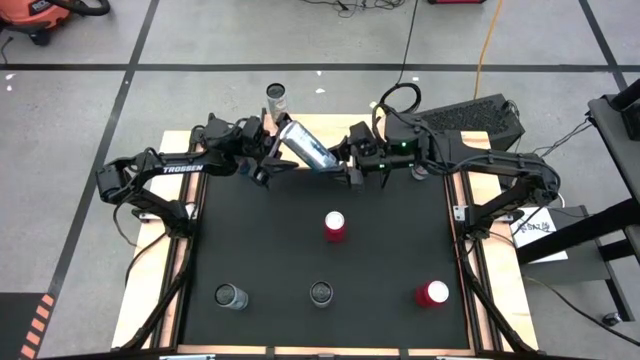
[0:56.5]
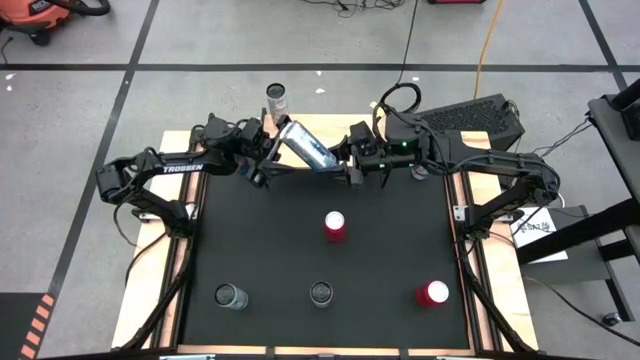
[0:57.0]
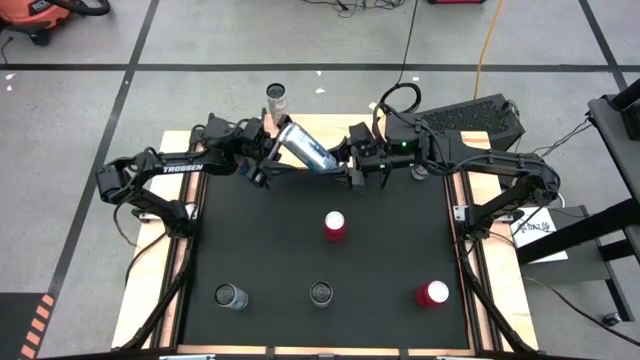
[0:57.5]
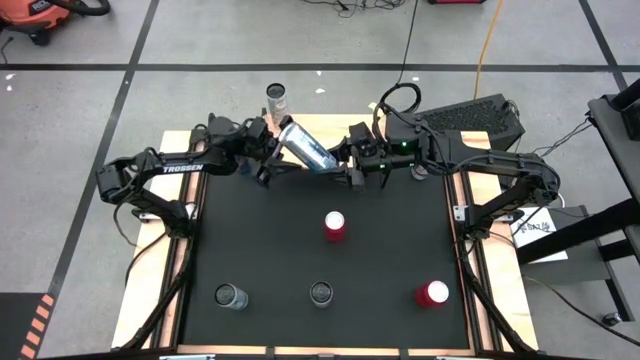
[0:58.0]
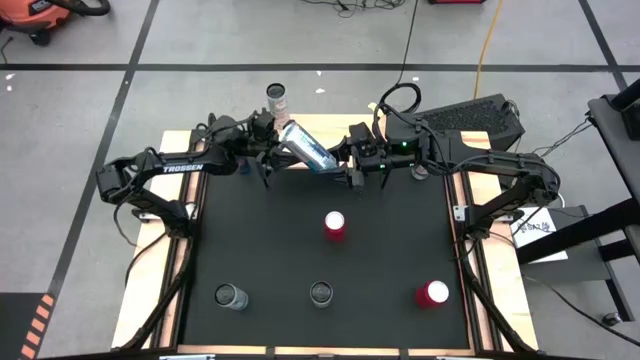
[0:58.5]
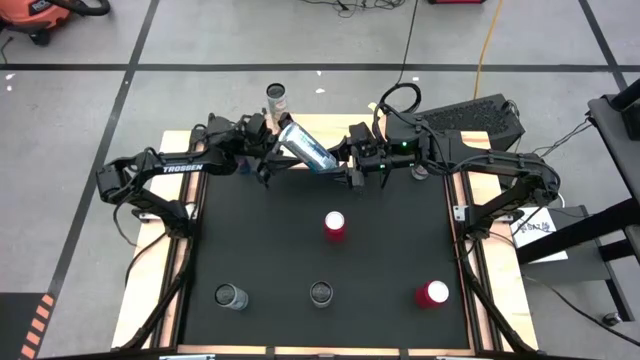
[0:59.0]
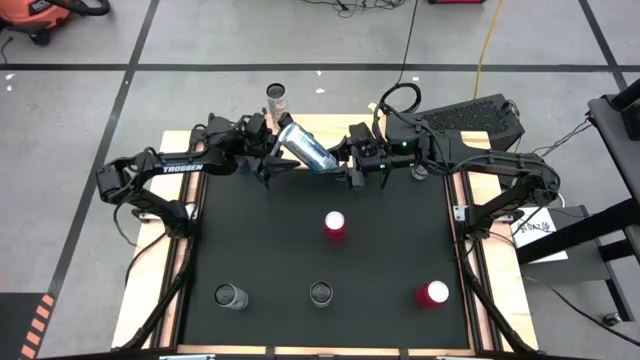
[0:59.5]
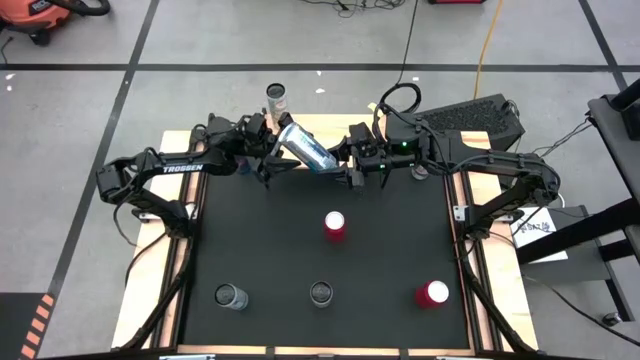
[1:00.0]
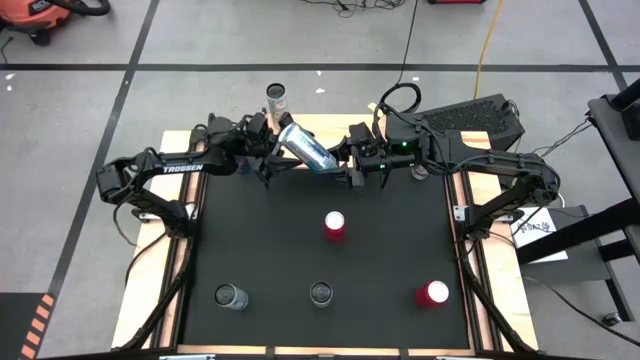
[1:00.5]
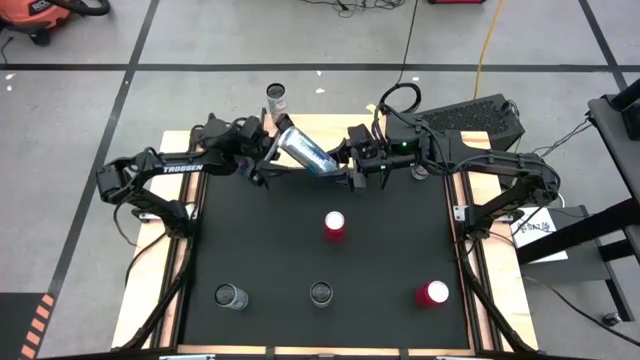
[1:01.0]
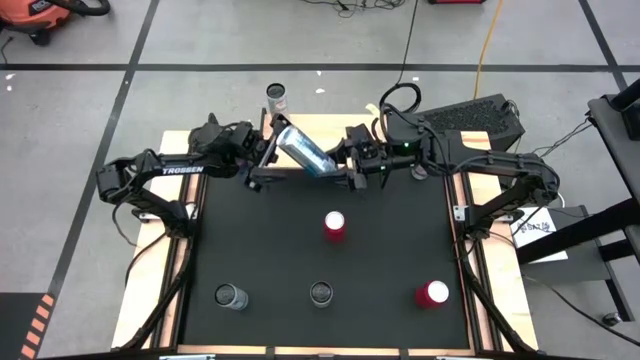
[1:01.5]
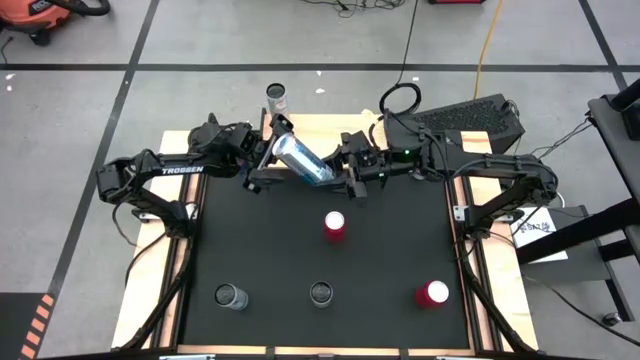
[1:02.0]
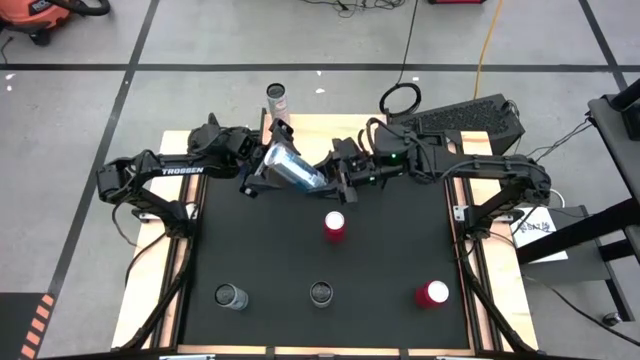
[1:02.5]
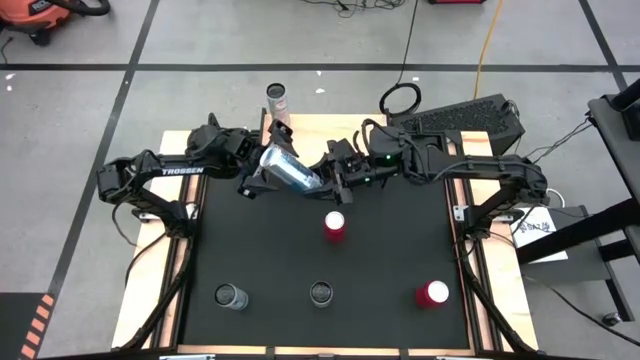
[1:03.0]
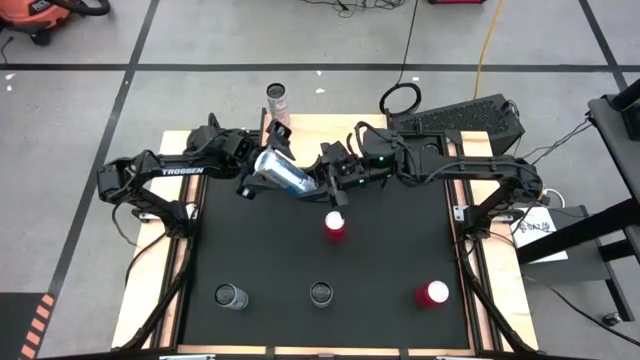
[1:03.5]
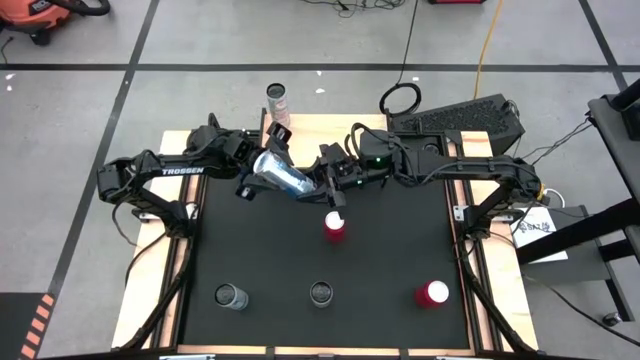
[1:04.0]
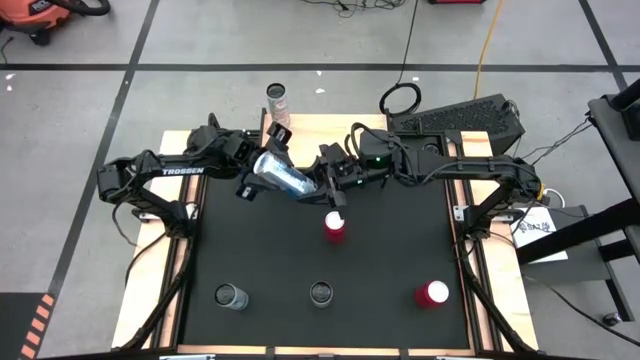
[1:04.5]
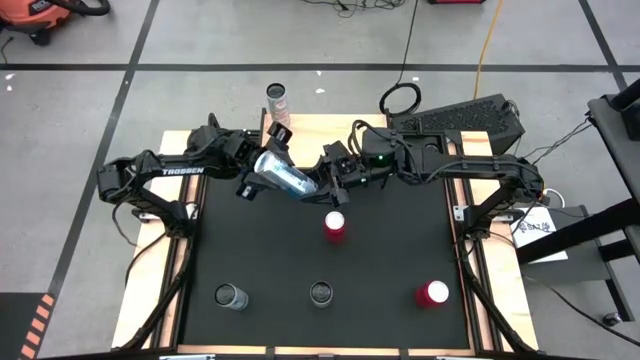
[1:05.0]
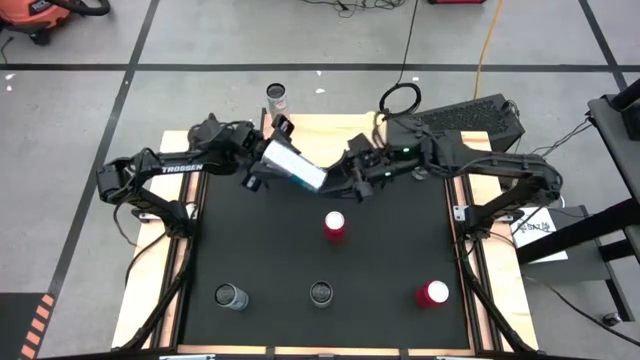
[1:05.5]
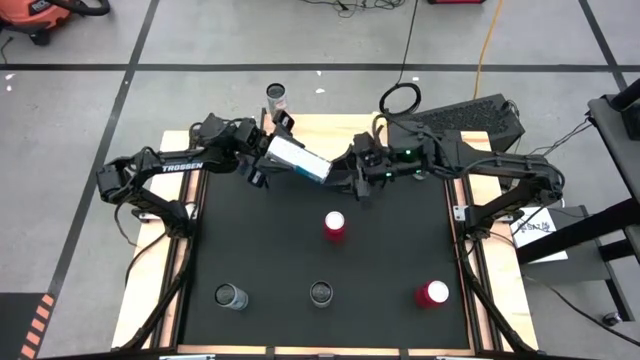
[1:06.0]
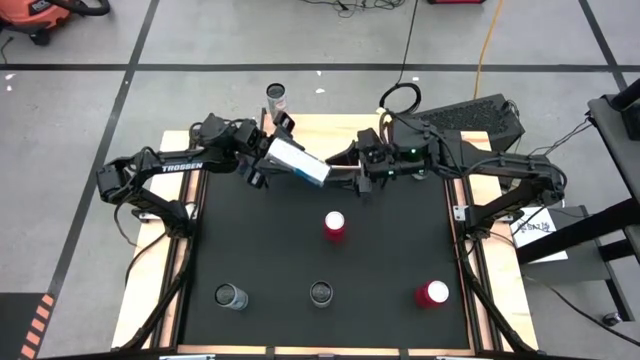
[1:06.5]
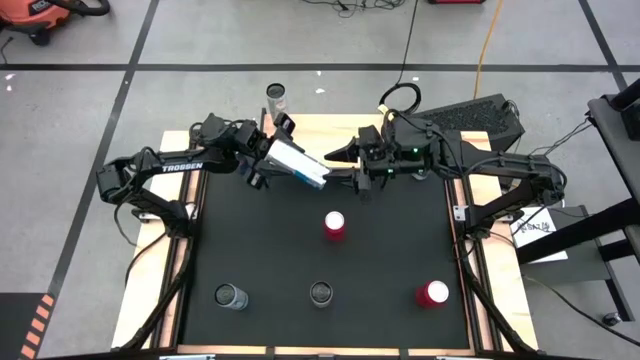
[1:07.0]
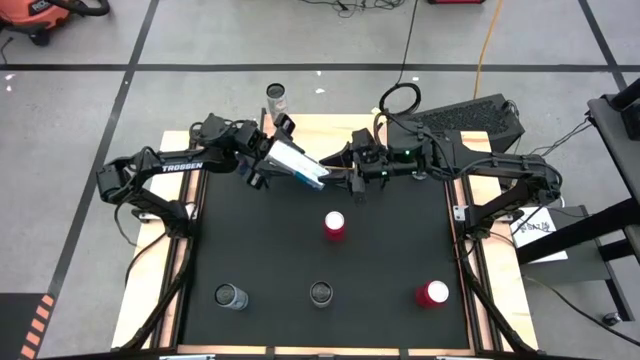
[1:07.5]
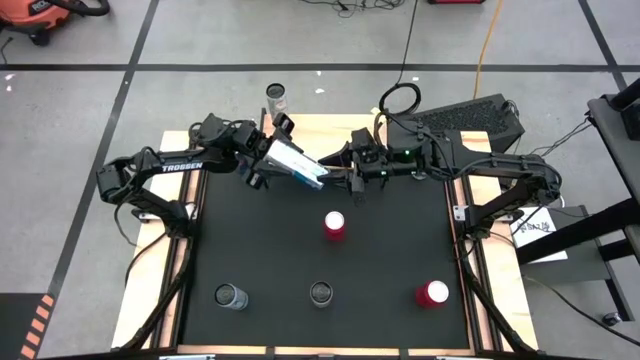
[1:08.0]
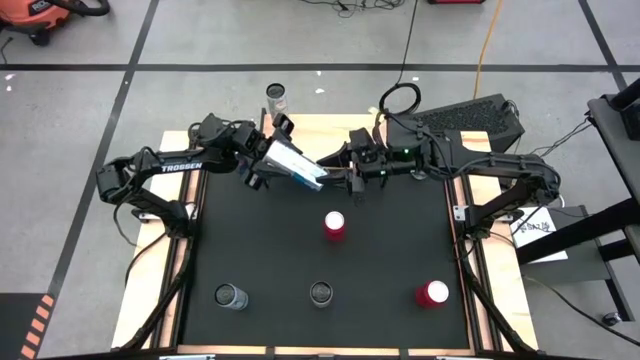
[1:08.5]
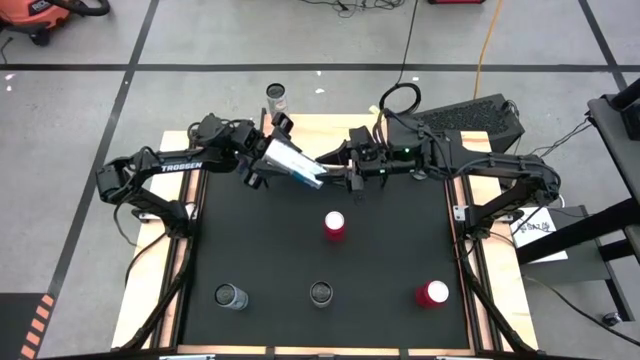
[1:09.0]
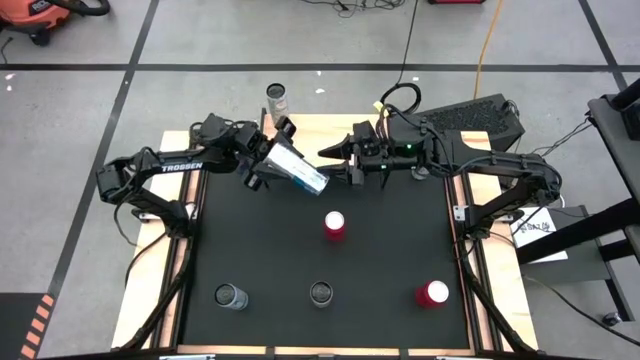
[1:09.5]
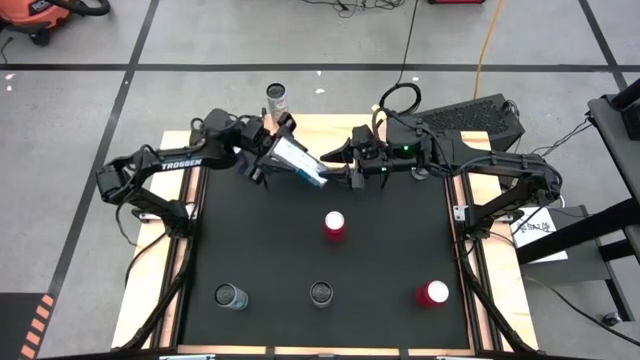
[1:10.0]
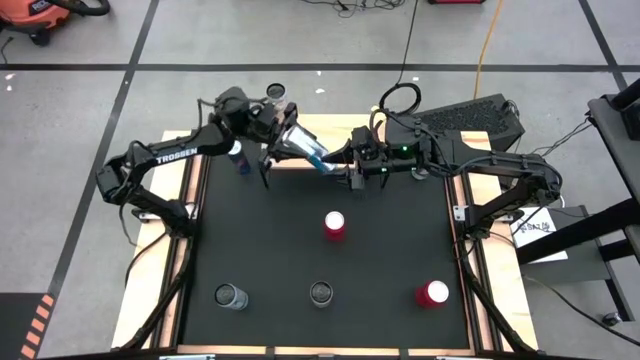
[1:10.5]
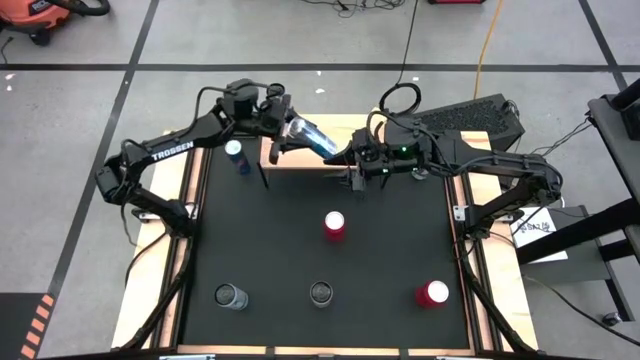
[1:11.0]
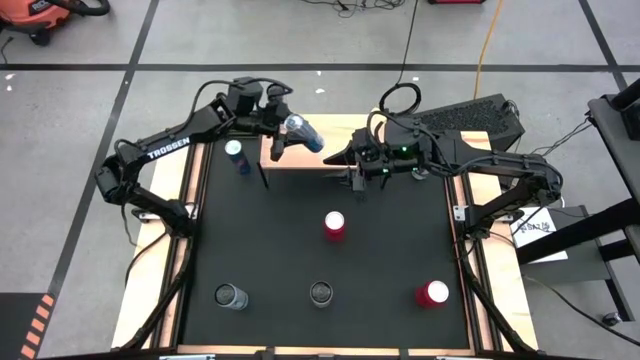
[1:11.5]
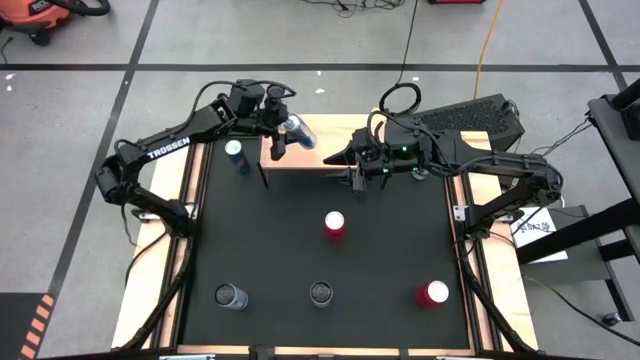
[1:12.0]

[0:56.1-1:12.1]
Task: Place canned beverage on shelf
Put the right blue soda can on the shelf

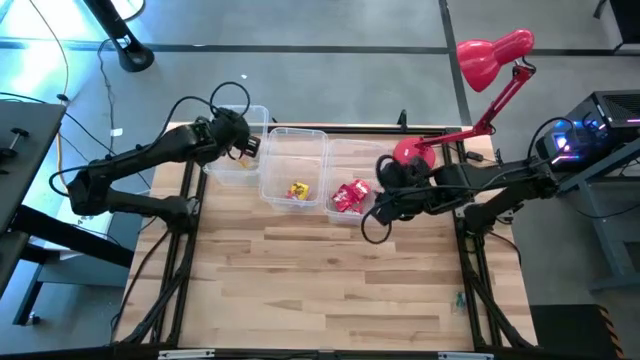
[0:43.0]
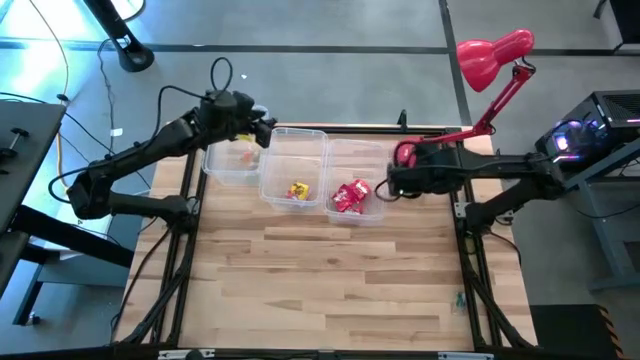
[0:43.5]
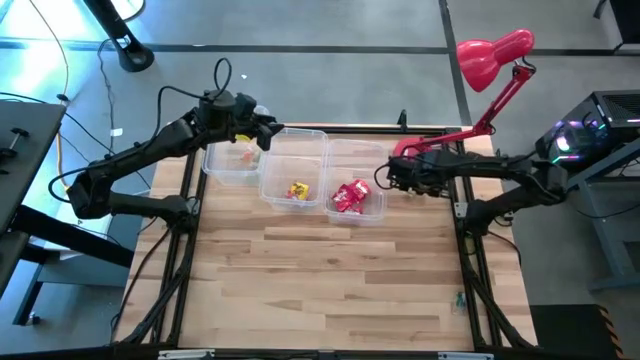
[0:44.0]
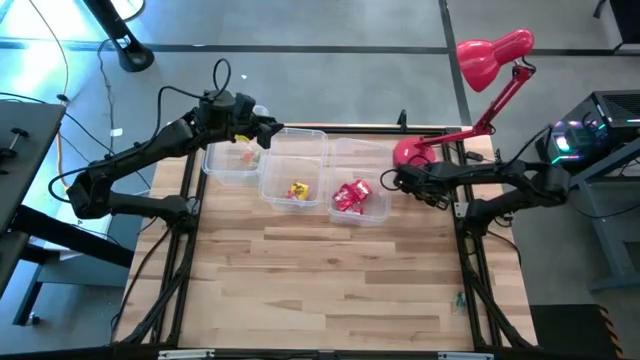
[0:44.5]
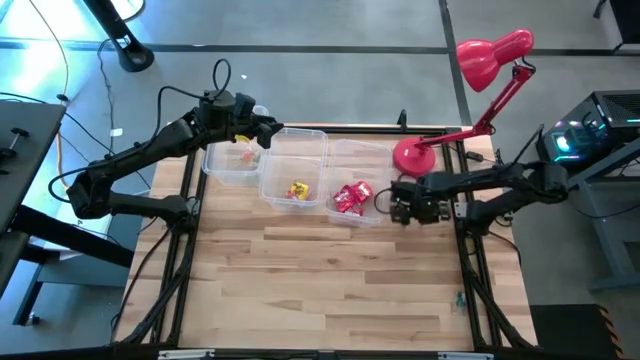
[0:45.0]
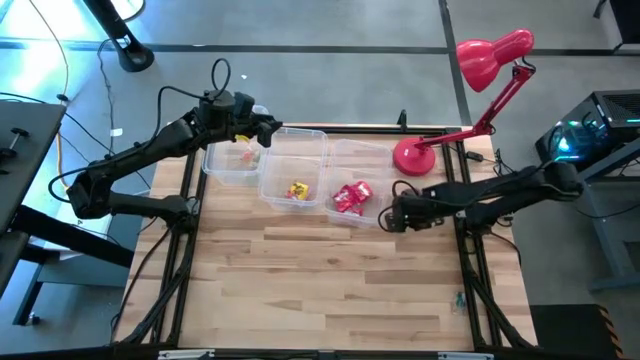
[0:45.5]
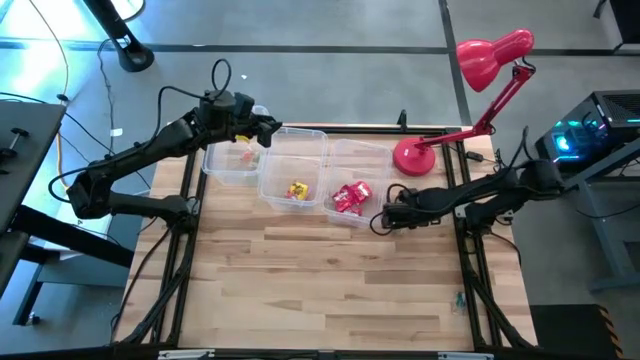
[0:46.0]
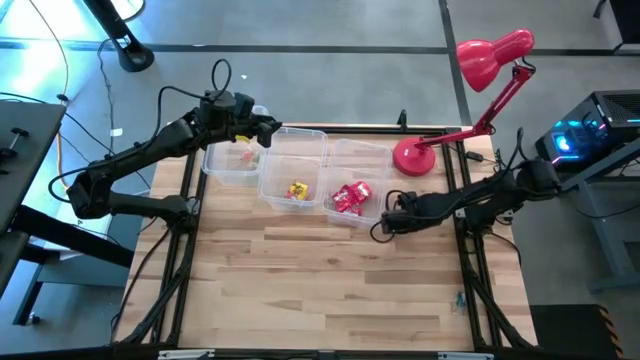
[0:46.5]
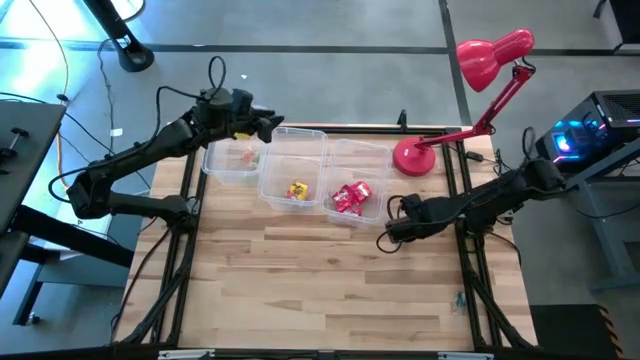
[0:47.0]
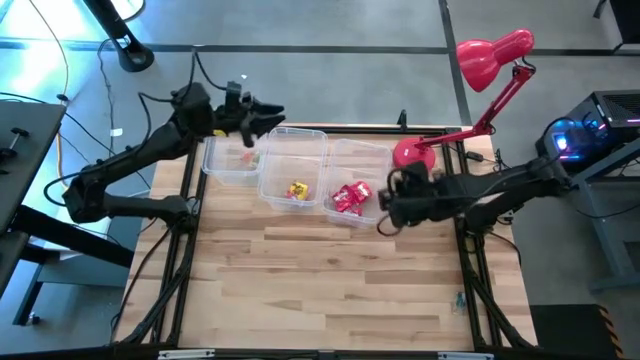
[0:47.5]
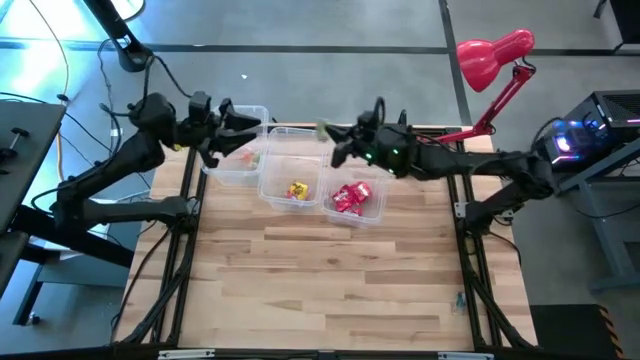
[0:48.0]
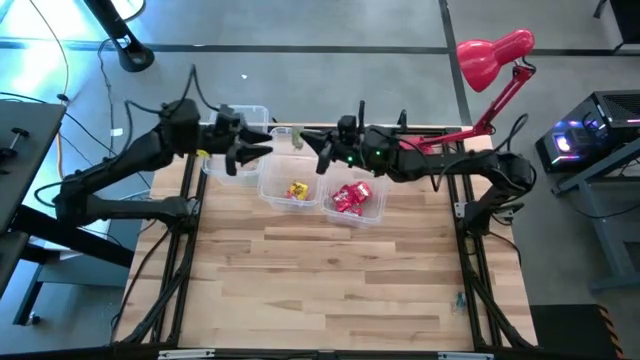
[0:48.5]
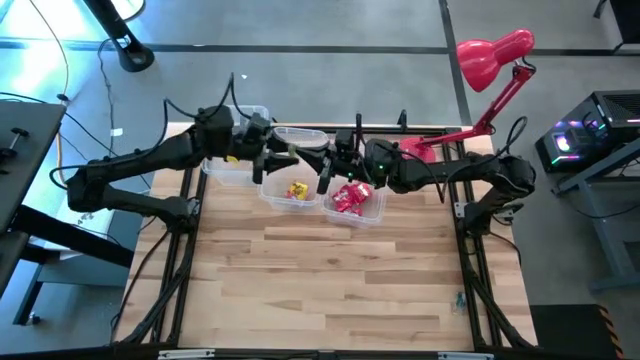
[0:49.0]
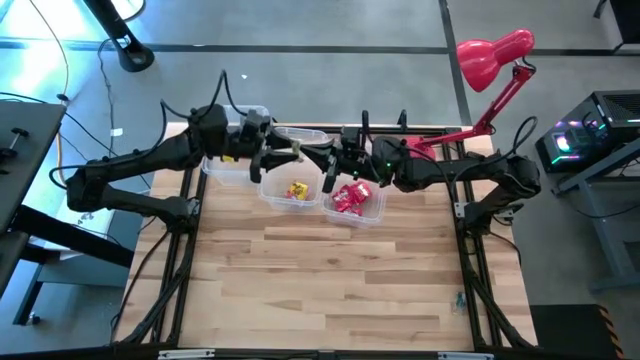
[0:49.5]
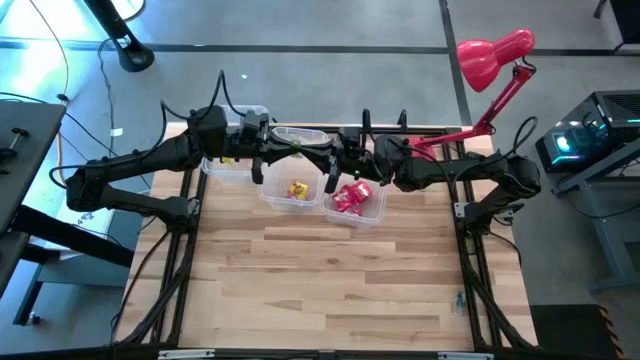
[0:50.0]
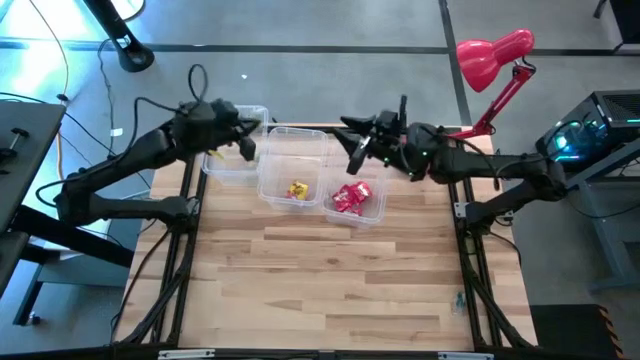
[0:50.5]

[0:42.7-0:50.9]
Task: Sort candy
Put the green gummy into the left transparent bin
